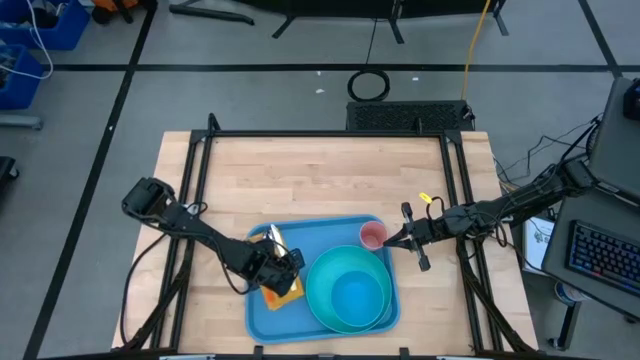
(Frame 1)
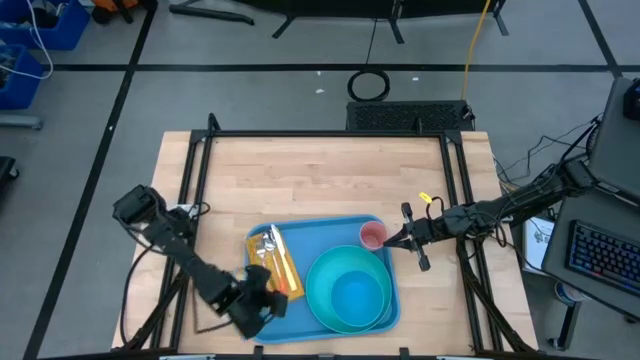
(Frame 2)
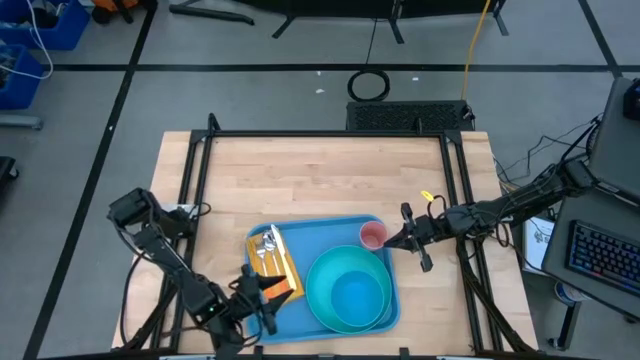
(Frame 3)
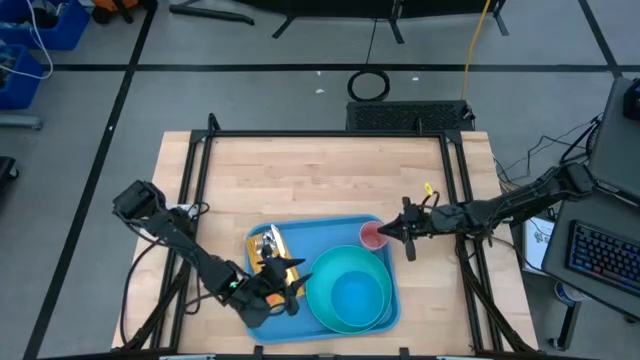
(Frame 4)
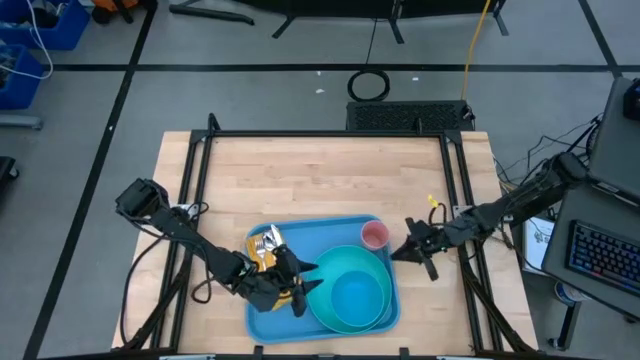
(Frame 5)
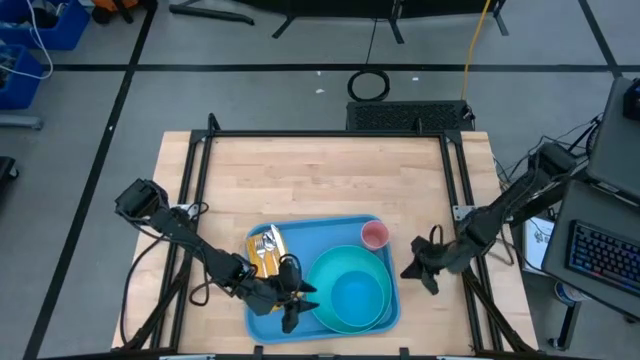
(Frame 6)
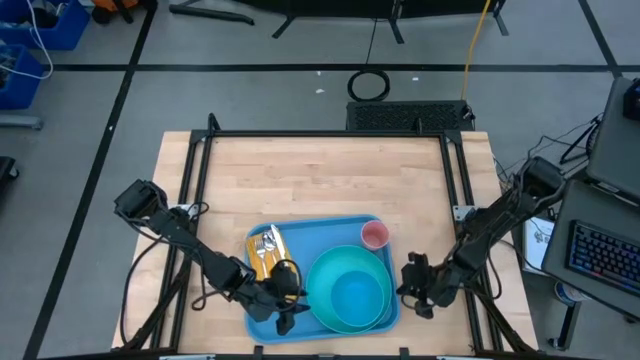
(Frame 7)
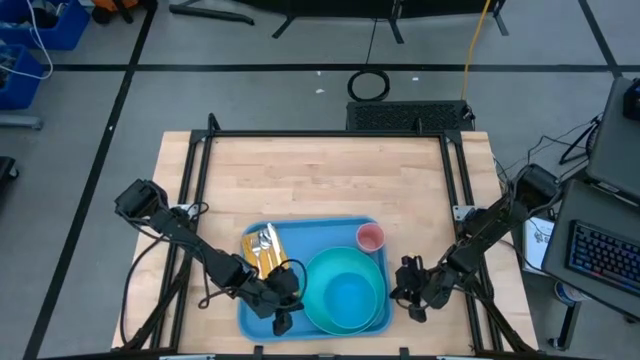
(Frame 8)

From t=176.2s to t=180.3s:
Task: Set up tray
Adjust the blue tray

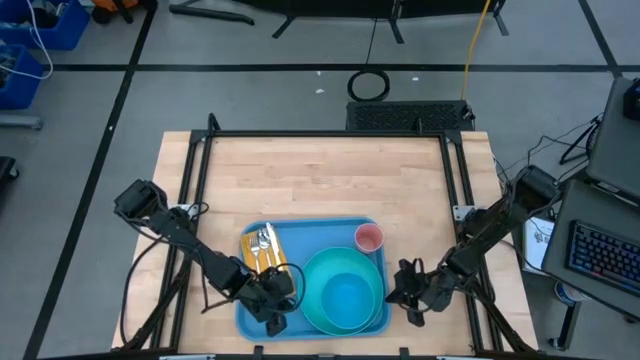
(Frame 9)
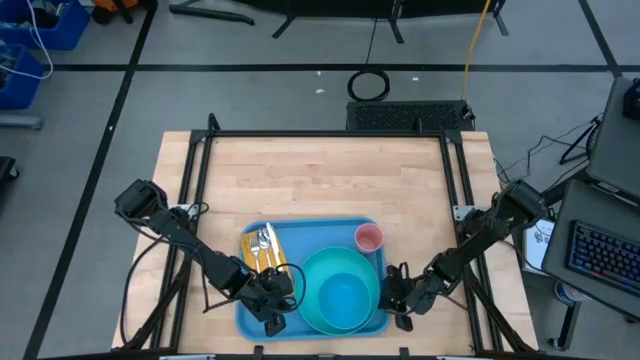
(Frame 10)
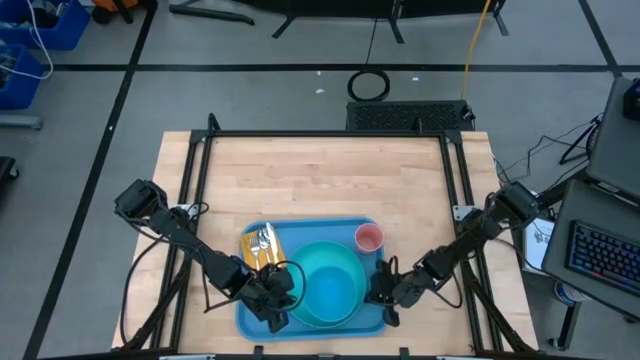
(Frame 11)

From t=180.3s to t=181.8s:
Adjust the green plate on the blue tray

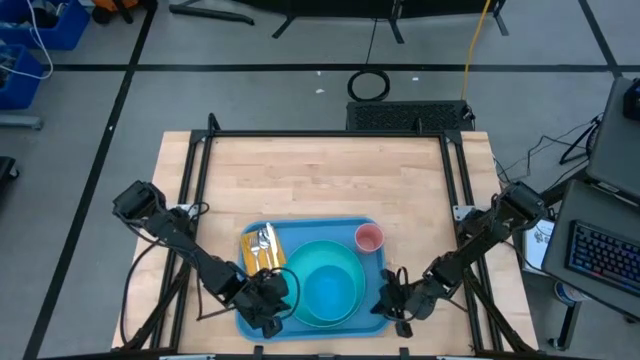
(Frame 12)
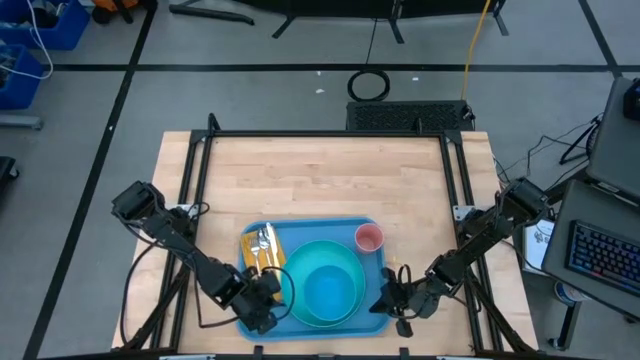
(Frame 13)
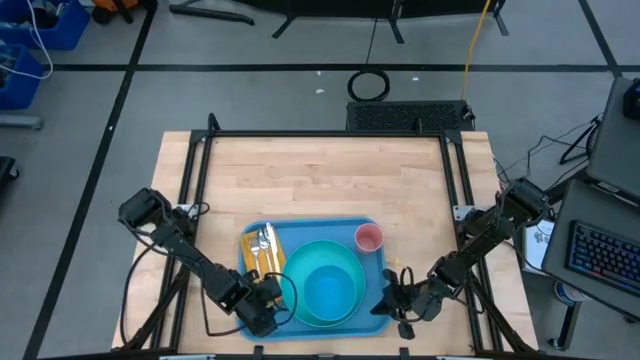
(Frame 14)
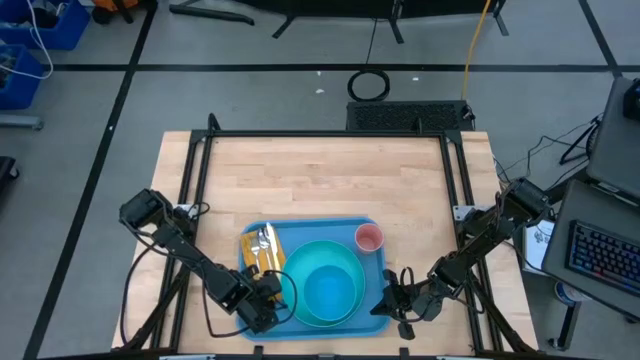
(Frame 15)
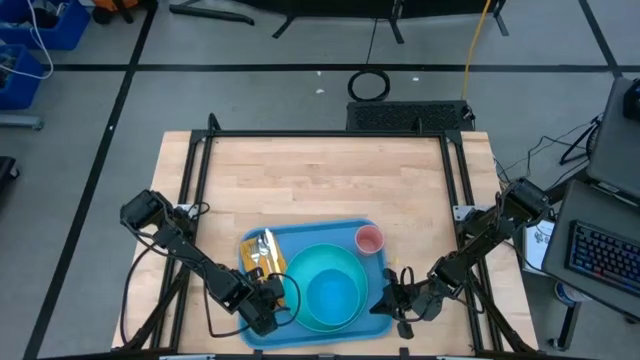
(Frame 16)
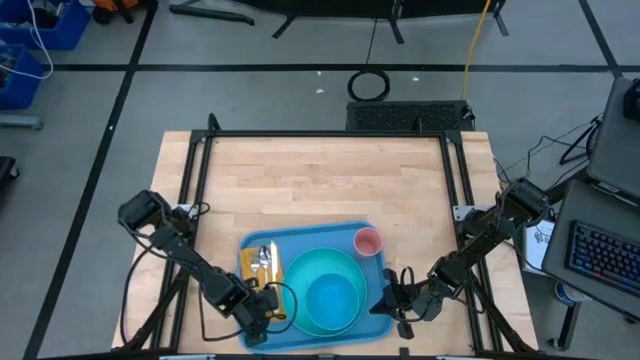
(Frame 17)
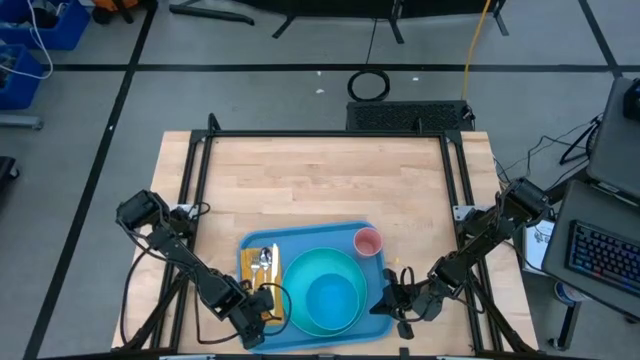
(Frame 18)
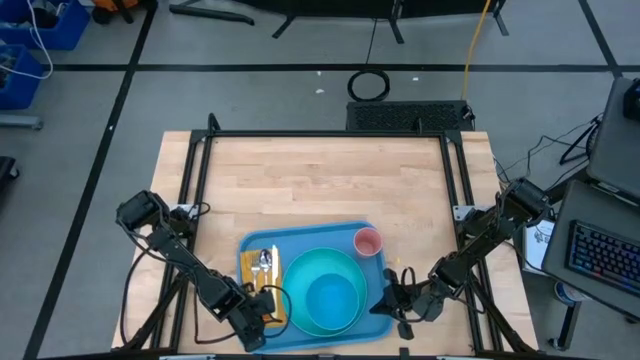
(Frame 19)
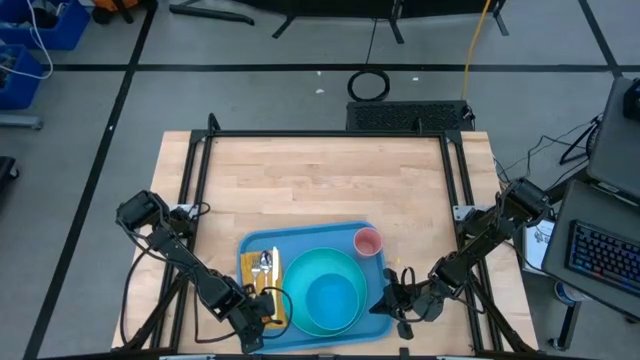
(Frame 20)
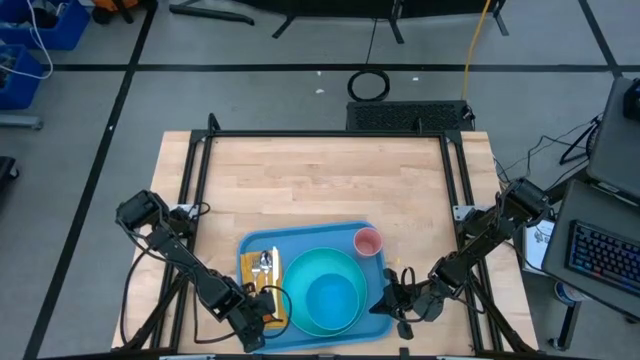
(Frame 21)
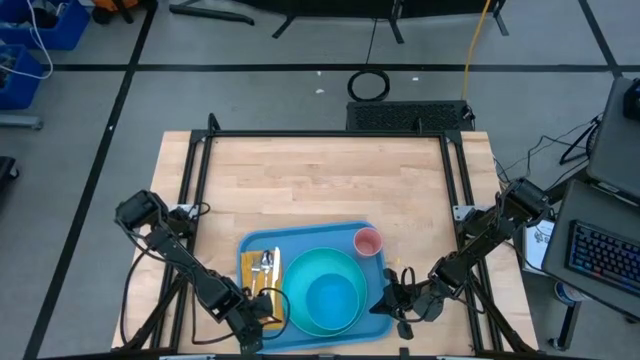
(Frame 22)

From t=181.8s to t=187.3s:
Adjust the yellow table napkin on the blue tray

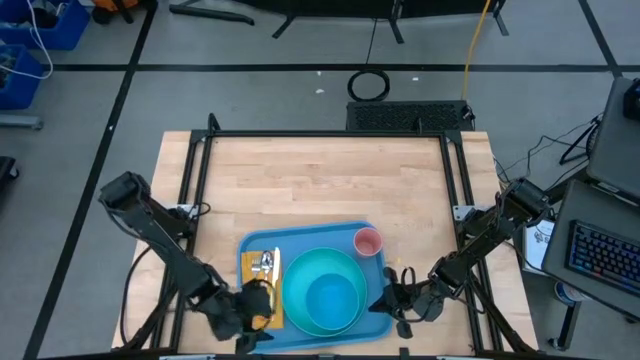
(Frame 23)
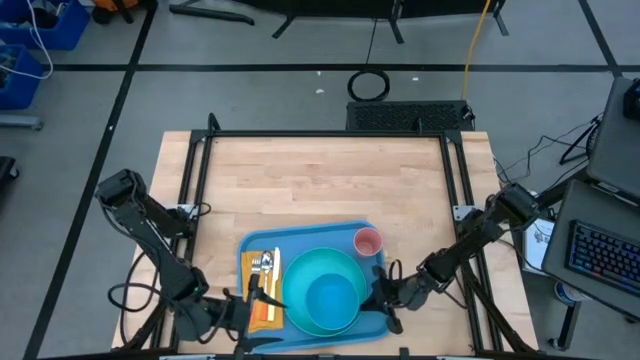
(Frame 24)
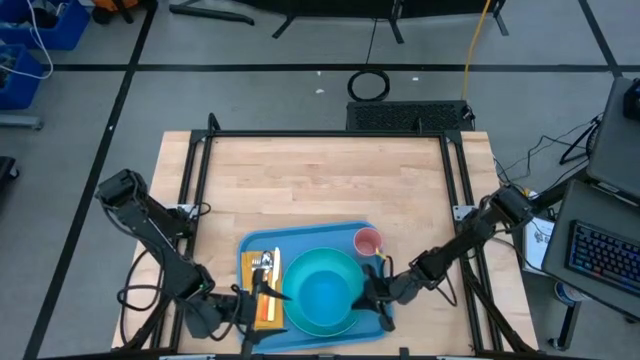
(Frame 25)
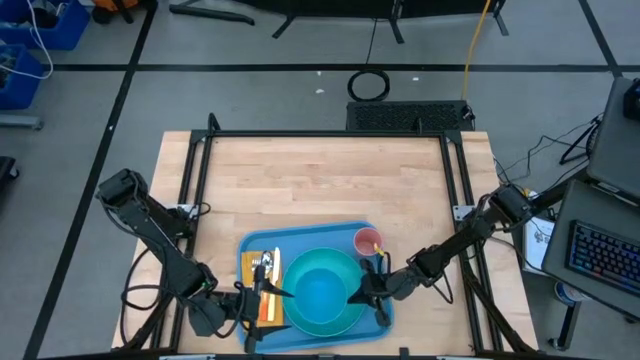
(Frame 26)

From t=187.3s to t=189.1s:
Adjust the blue bowl on top of the green plate

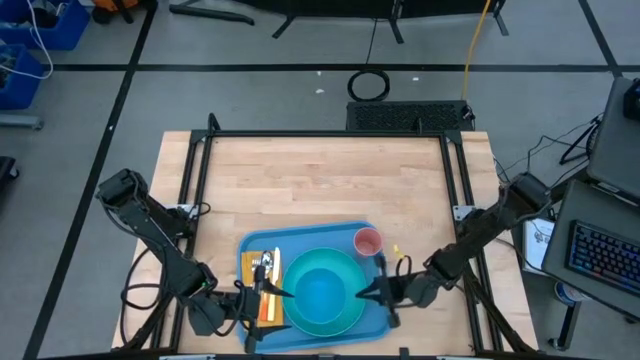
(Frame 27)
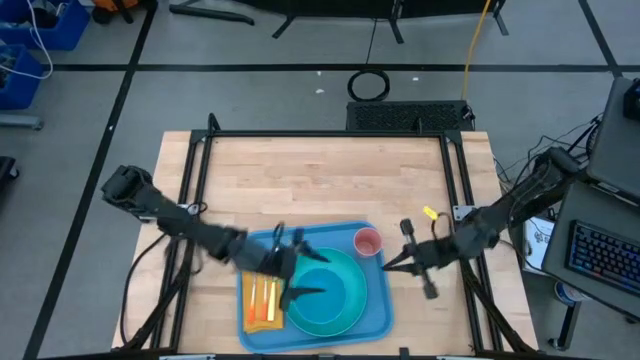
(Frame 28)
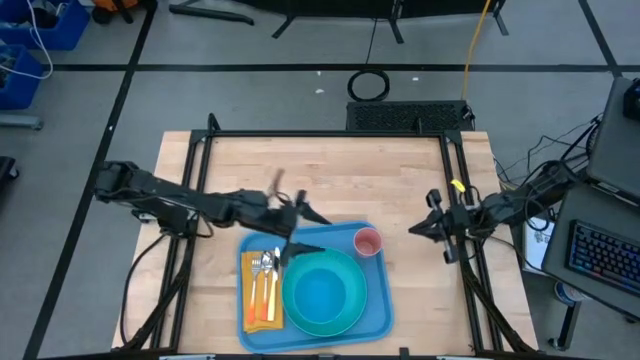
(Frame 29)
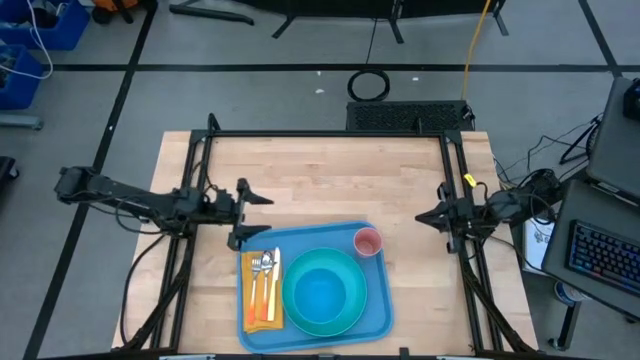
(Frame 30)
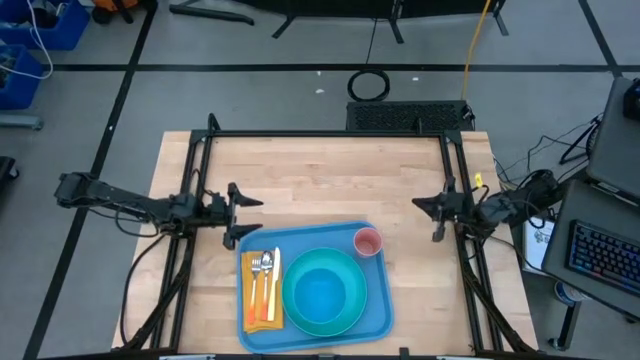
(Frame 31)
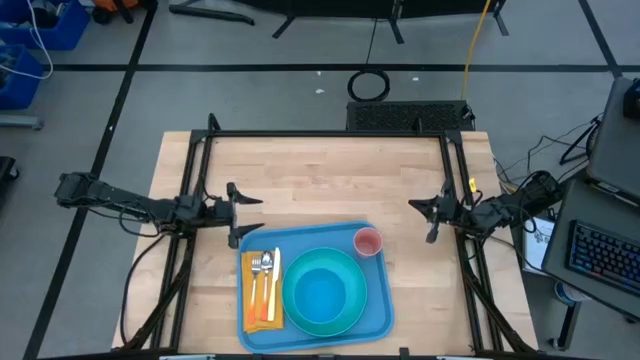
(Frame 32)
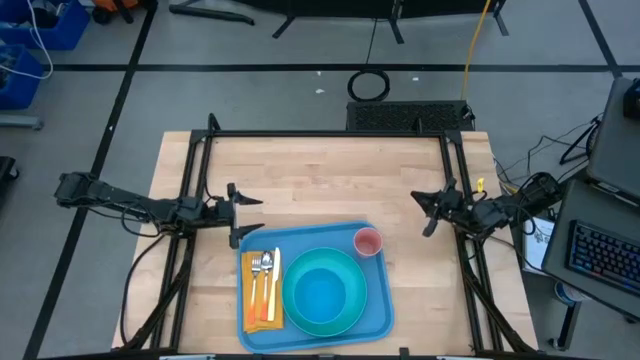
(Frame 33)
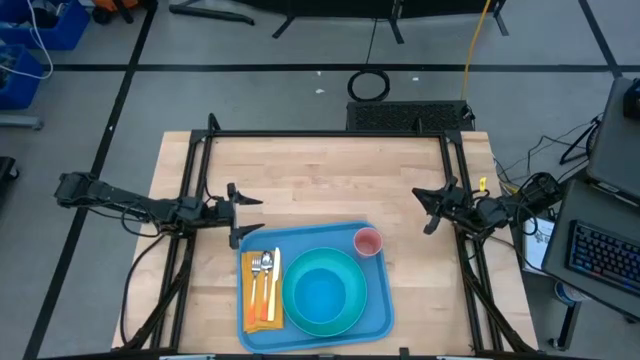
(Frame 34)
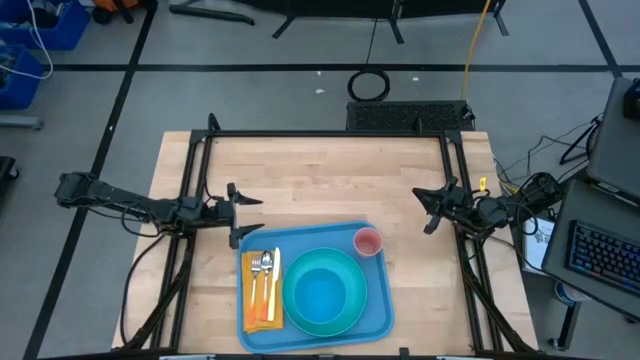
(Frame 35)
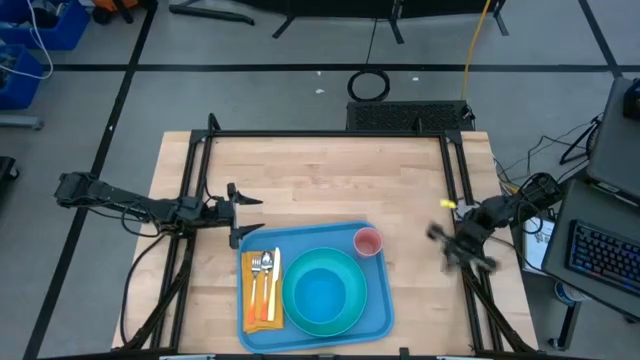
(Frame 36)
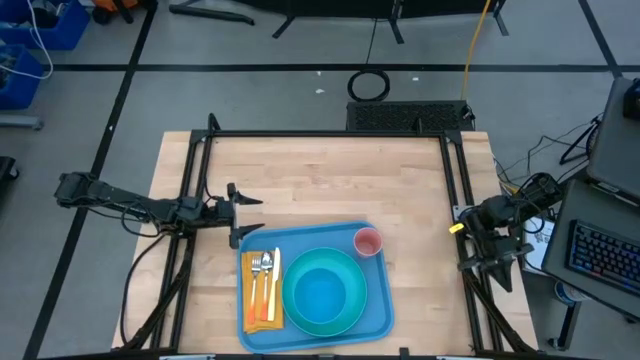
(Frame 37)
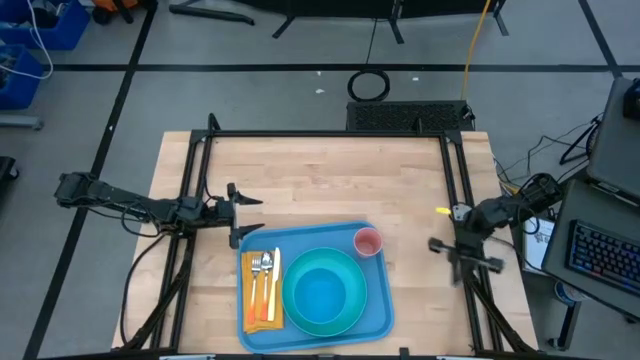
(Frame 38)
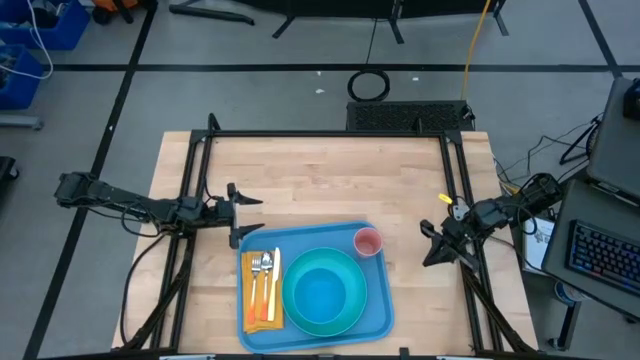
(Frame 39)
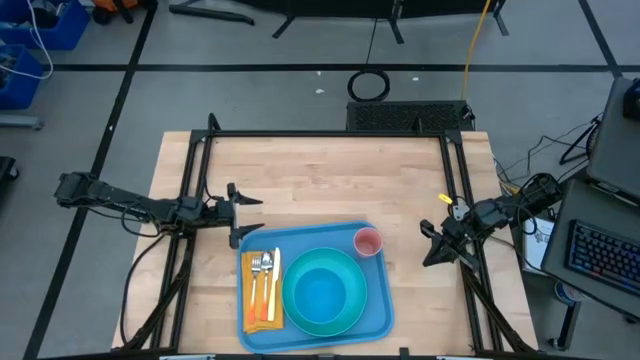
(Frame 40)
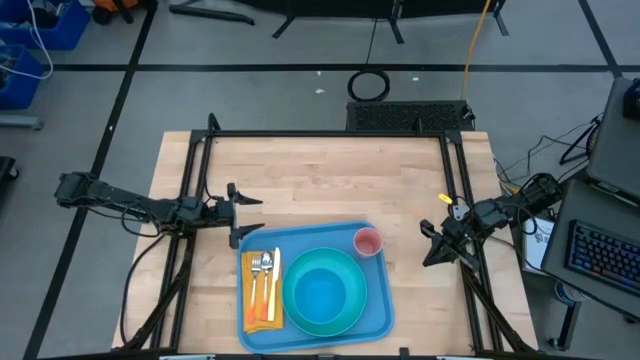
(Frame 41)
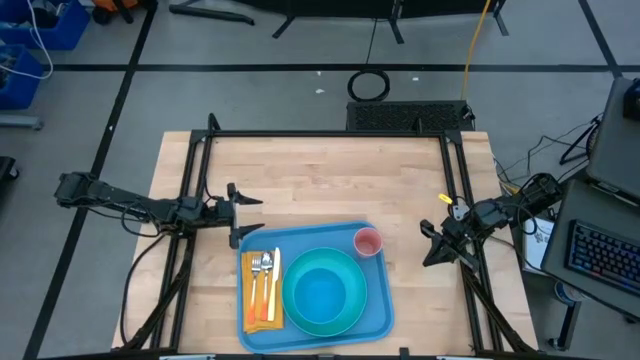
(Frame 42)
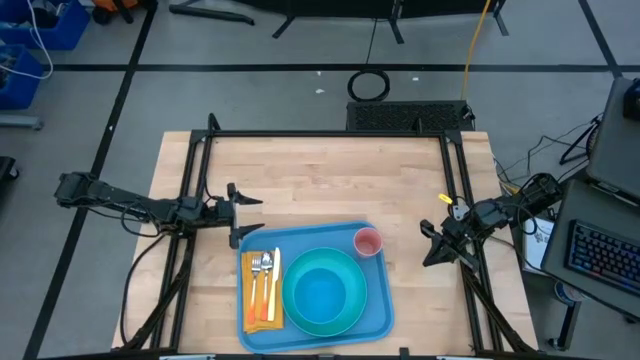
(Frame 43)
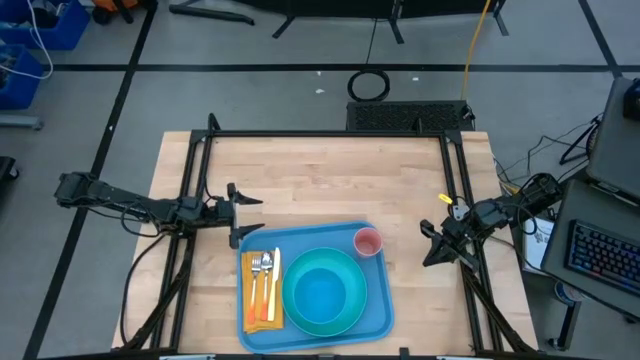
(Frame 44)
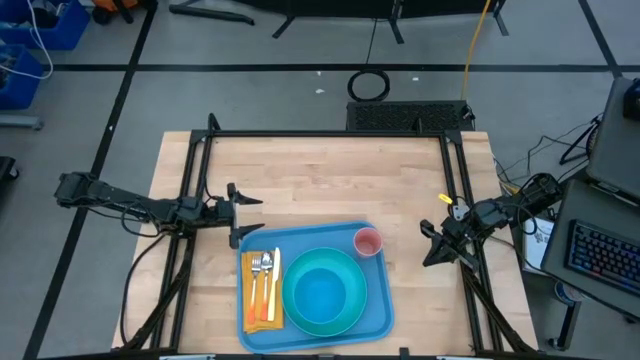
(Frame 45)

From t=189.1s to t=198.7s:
Return to Home Position
